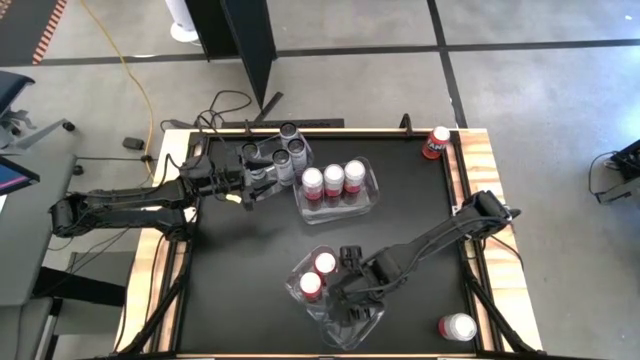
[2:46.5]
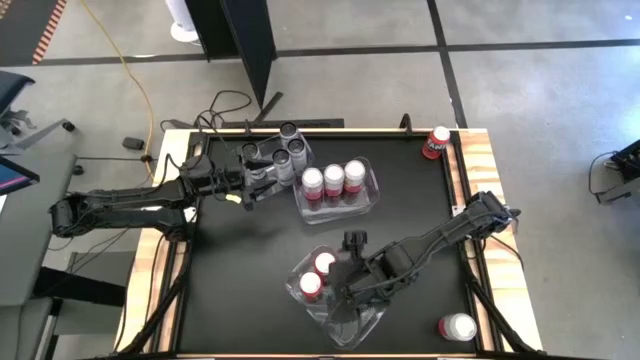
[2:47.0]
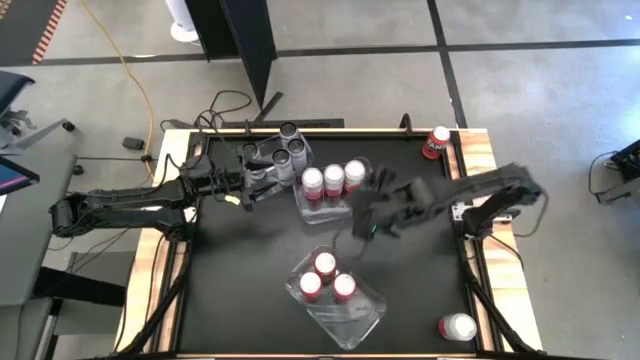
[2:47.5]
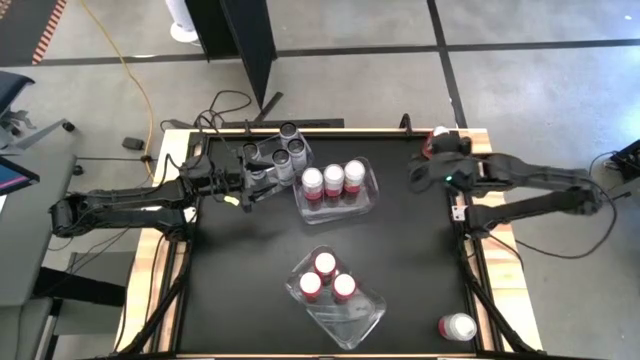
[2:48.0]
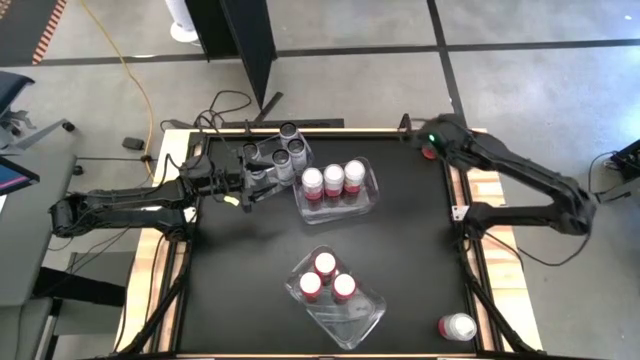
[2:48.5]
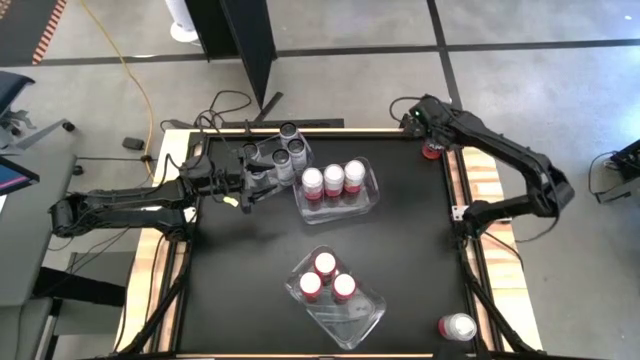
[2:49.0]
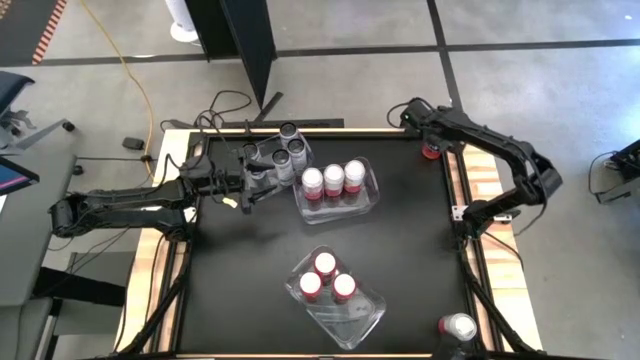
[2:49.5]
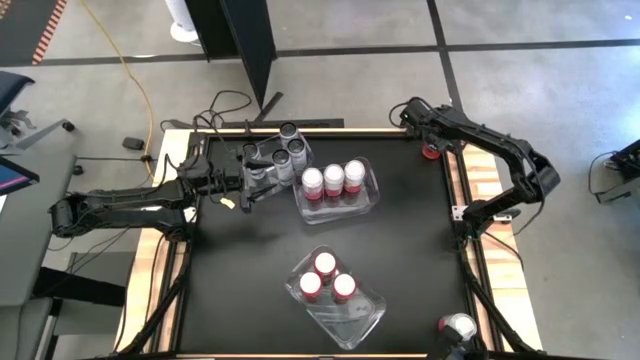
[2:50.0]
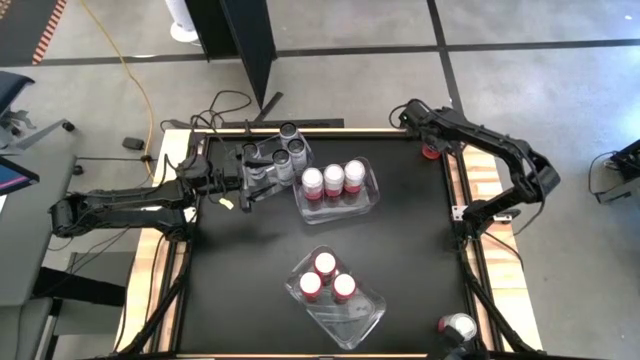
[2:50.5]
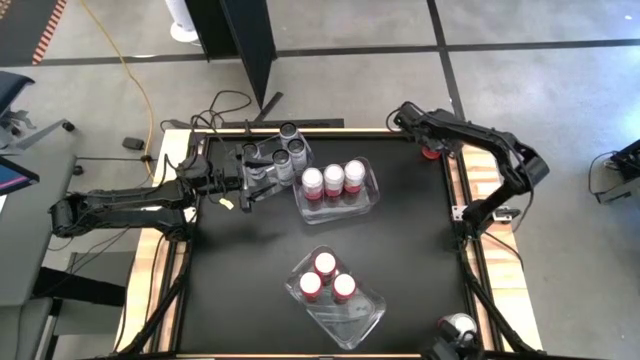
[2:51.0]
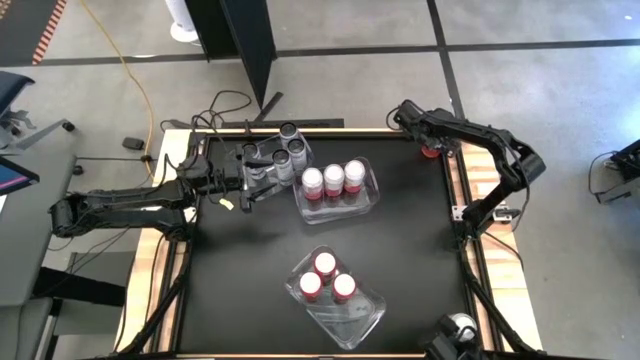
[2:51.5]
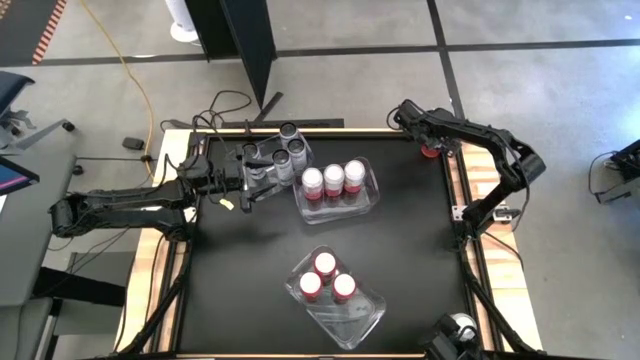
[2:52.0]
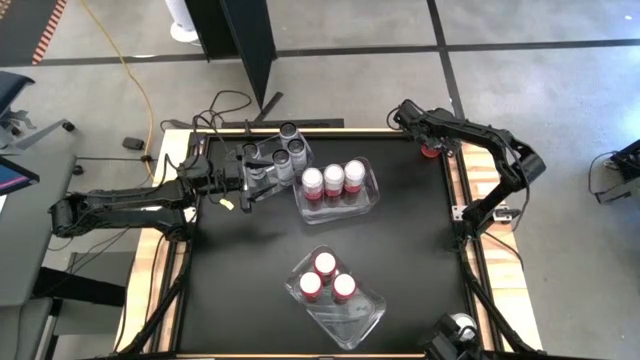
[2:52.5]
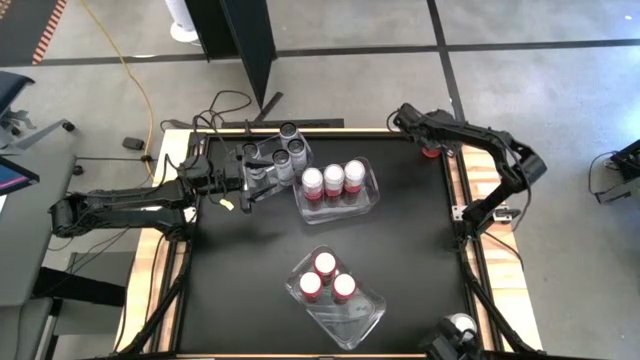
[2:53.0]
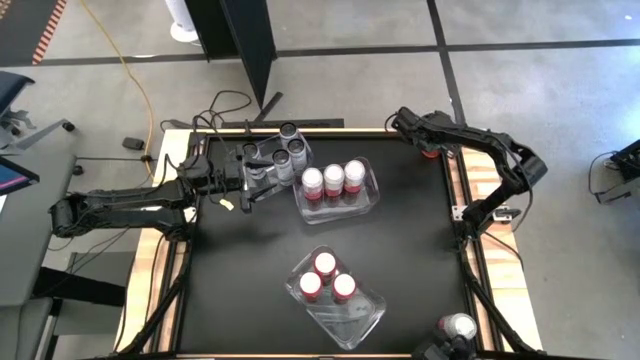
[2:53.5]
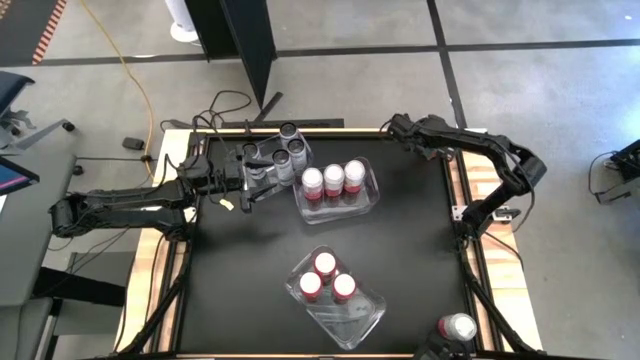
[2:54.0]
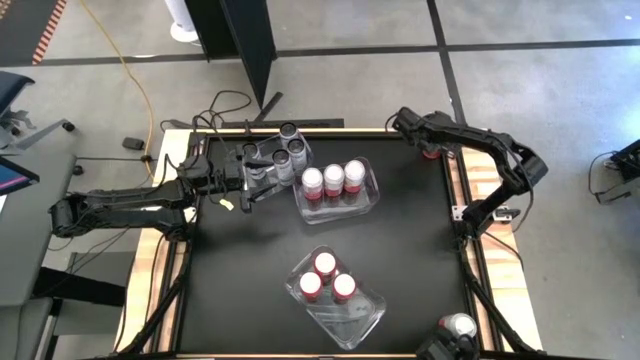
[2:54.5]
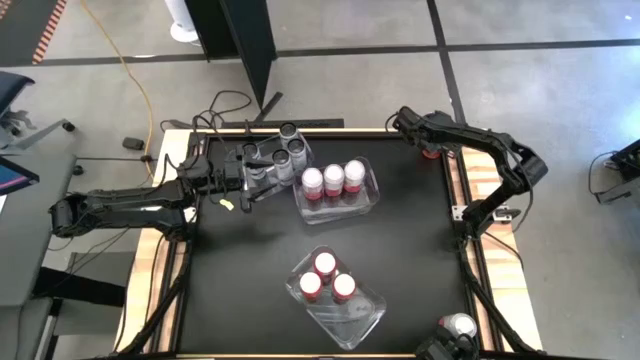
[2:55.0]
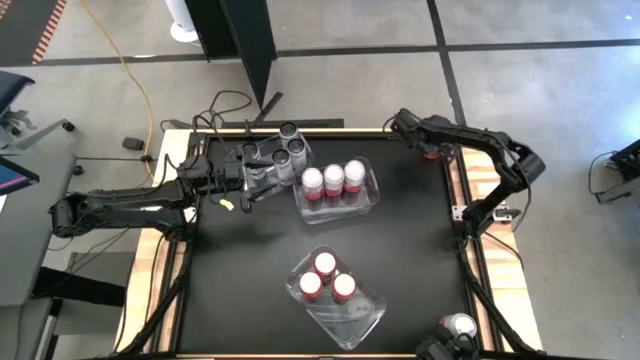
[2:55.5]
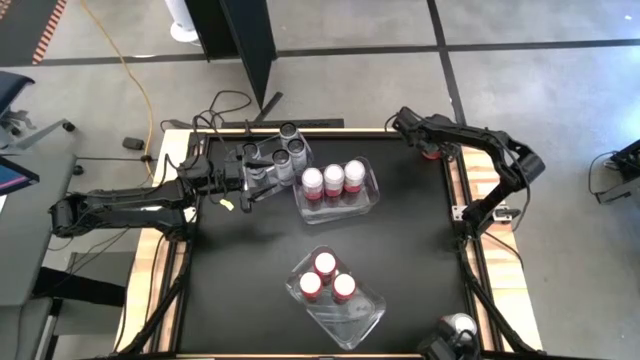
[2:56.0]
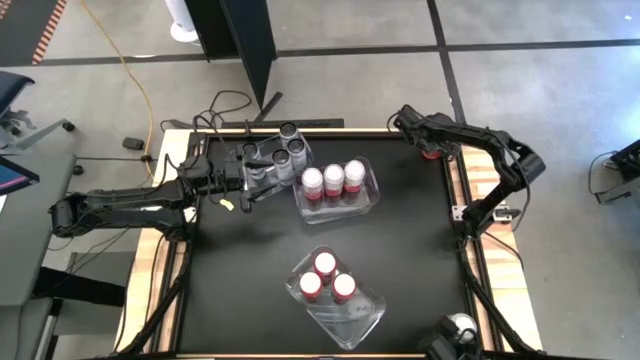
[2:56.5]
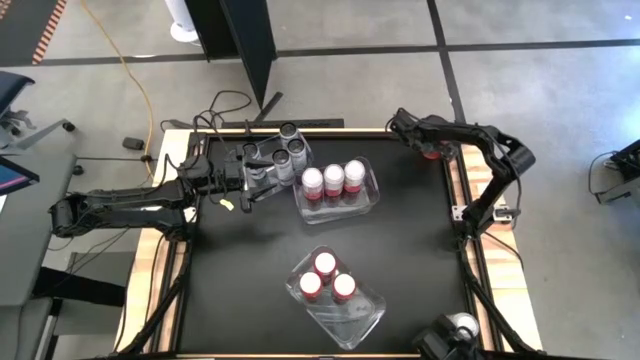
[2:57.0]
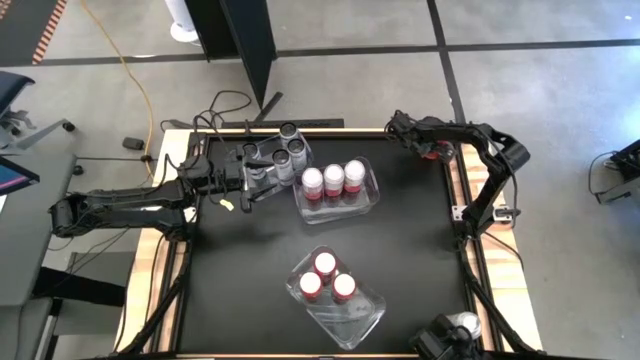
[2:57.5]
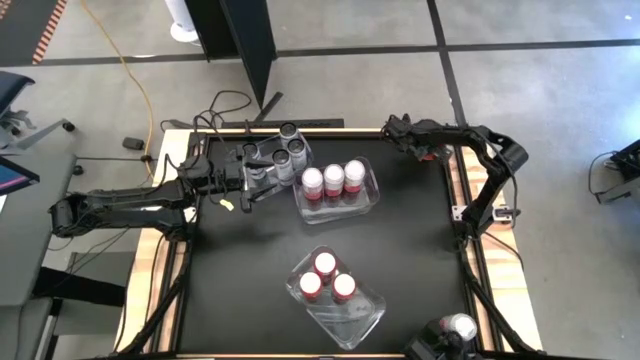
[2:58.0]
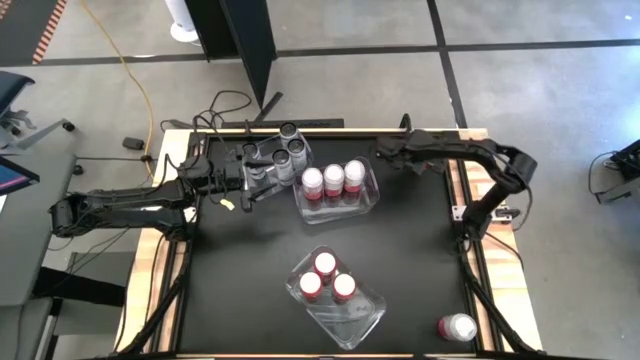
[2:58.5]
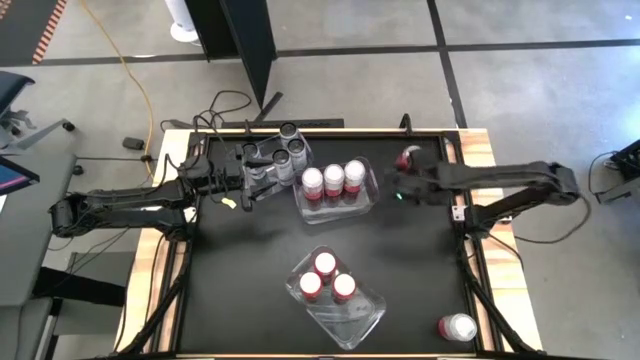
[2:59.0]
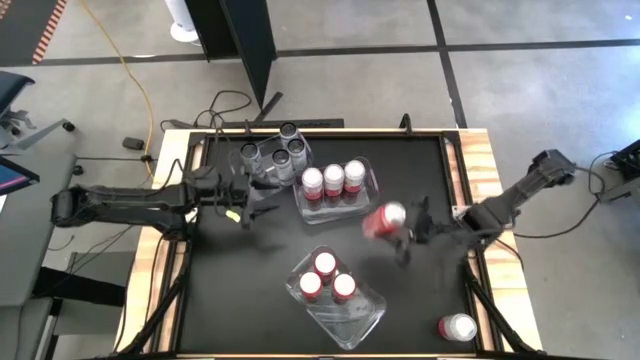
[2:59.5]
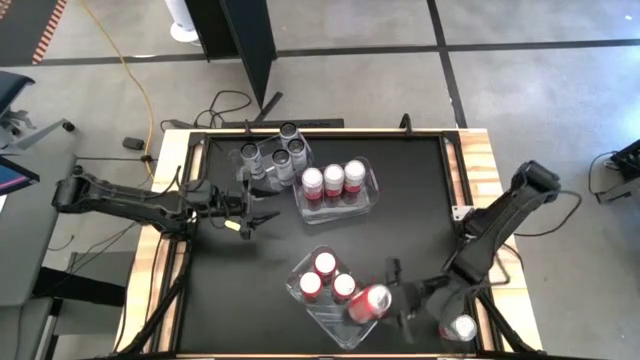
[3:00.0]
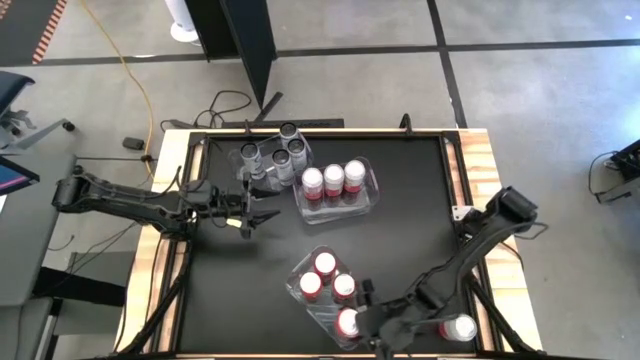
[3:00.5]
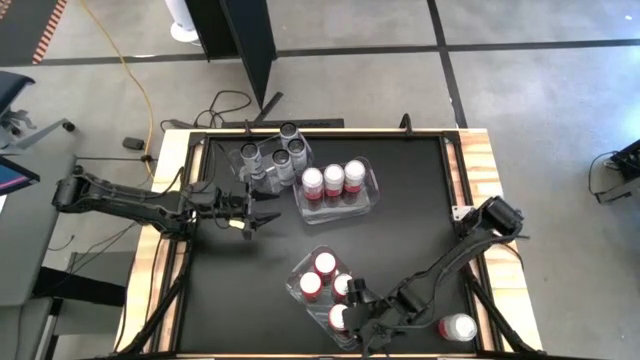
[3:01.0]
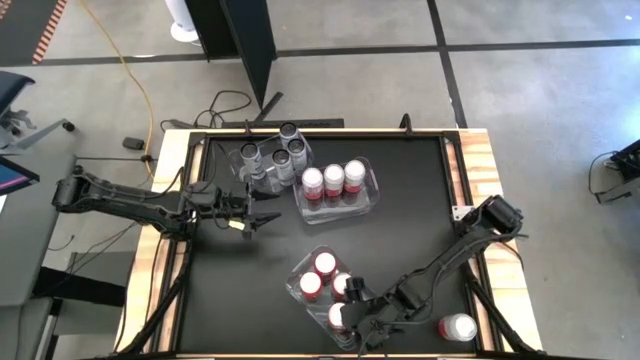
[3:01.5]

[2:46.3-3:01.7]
Task: Sort soda cans
Put the orange soda can in the bottom transparent bin
